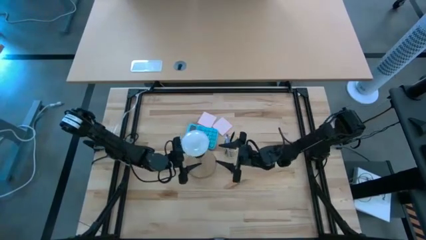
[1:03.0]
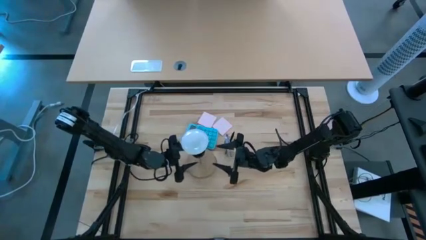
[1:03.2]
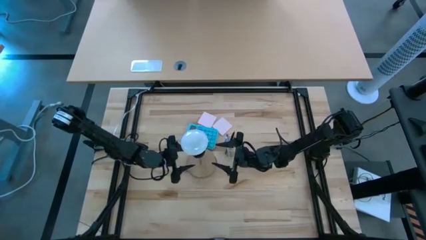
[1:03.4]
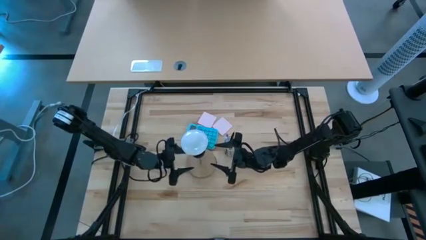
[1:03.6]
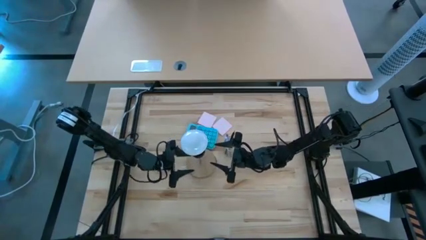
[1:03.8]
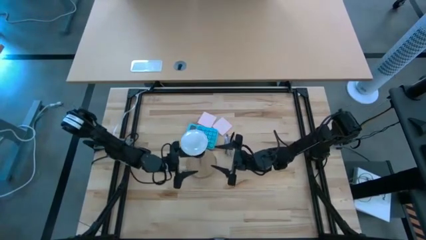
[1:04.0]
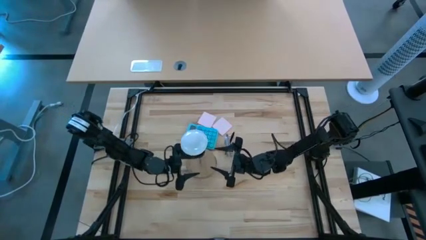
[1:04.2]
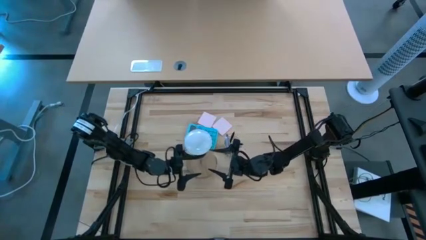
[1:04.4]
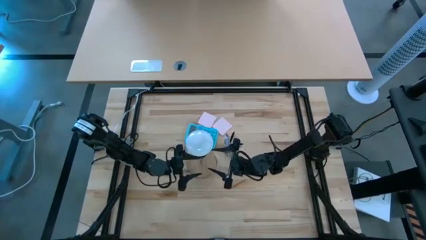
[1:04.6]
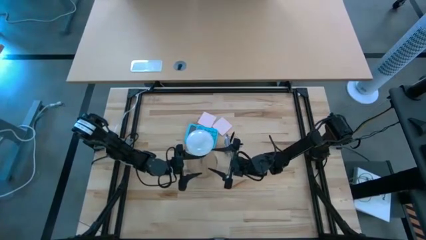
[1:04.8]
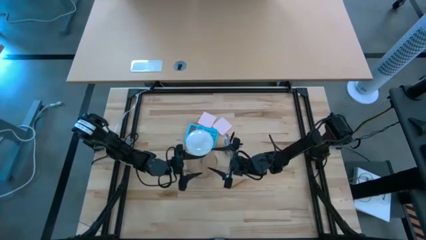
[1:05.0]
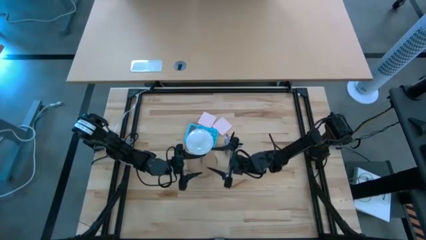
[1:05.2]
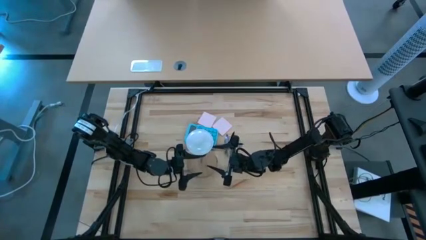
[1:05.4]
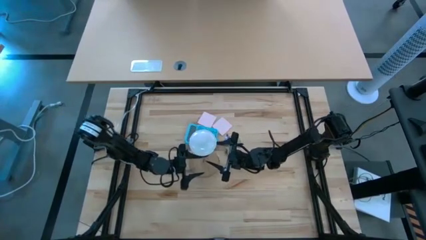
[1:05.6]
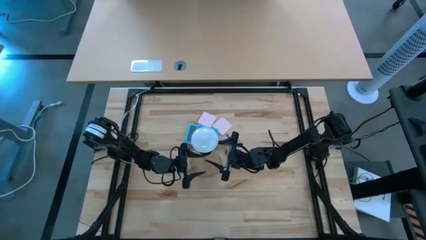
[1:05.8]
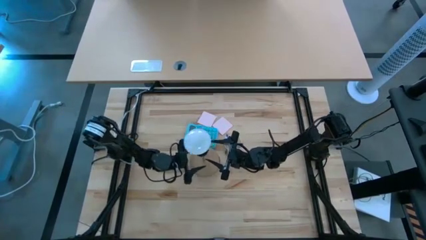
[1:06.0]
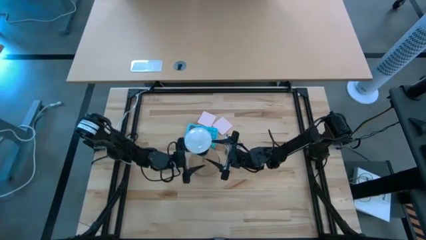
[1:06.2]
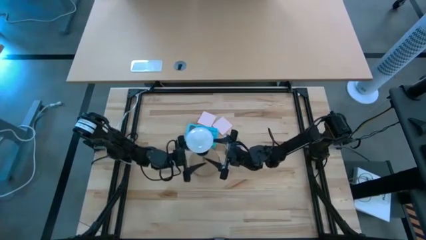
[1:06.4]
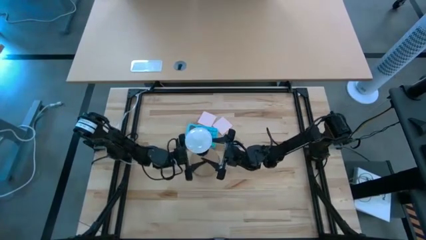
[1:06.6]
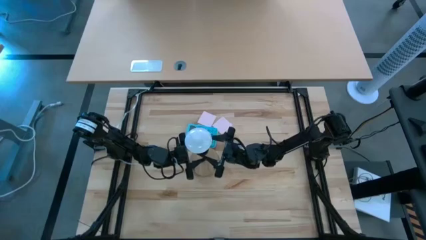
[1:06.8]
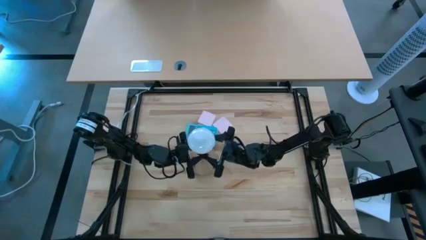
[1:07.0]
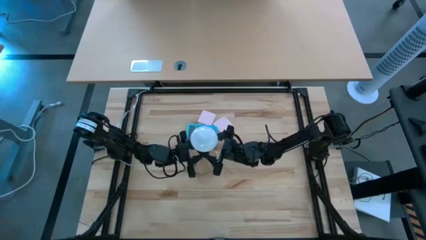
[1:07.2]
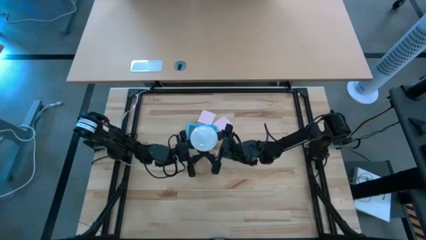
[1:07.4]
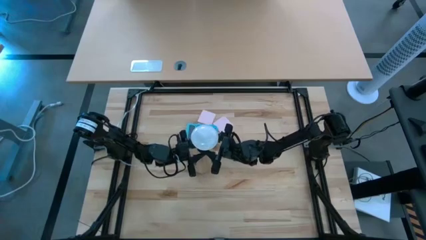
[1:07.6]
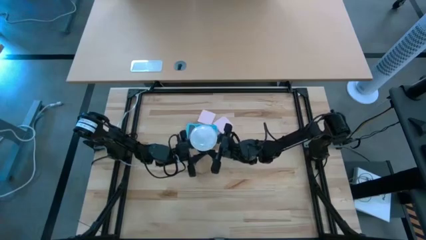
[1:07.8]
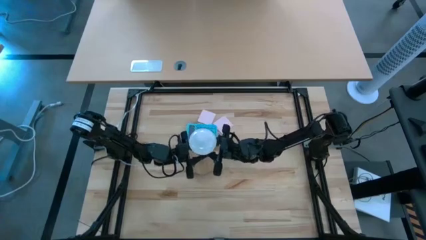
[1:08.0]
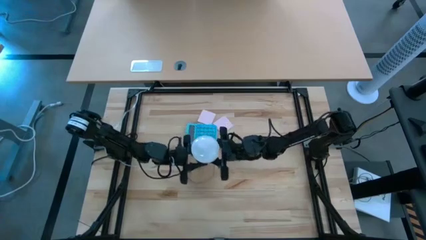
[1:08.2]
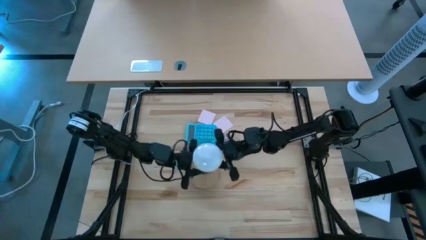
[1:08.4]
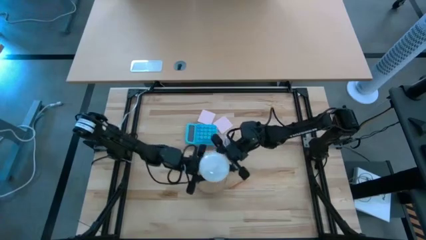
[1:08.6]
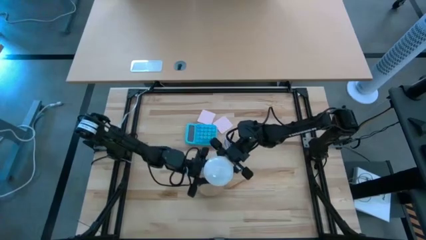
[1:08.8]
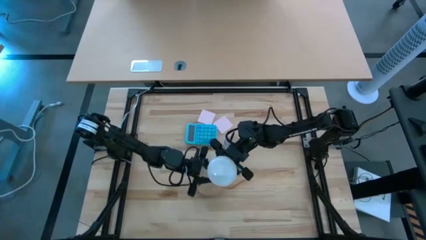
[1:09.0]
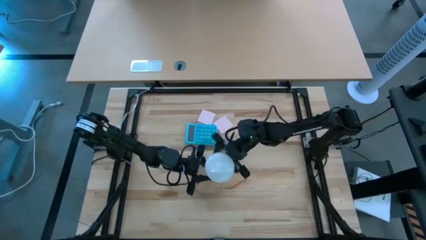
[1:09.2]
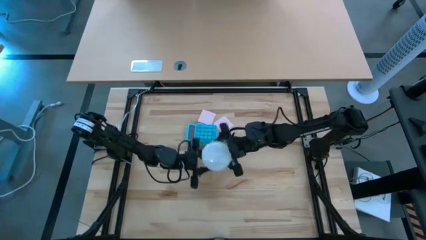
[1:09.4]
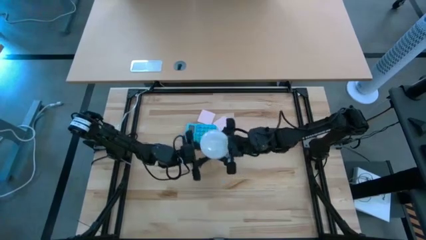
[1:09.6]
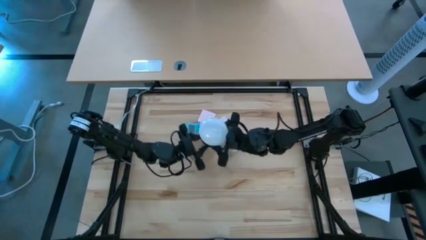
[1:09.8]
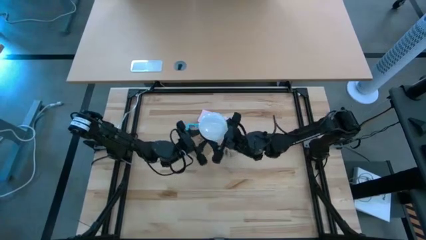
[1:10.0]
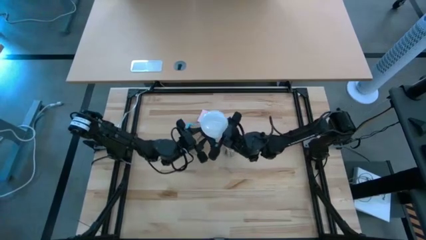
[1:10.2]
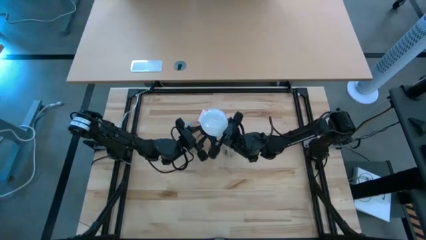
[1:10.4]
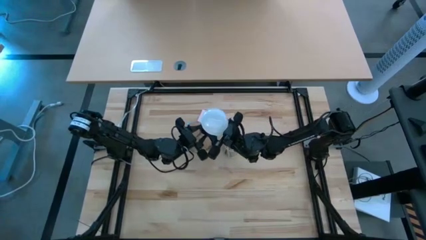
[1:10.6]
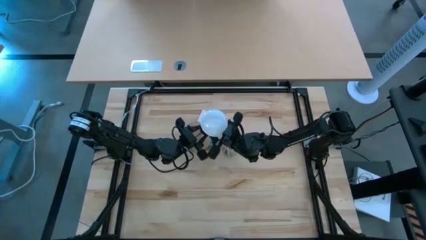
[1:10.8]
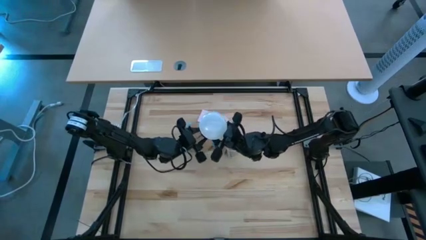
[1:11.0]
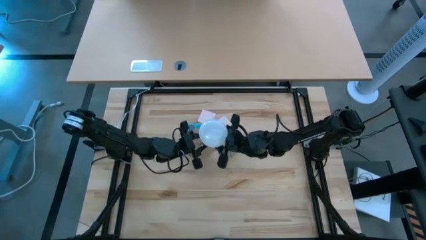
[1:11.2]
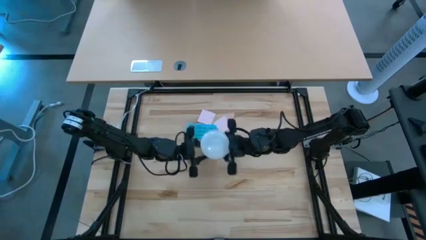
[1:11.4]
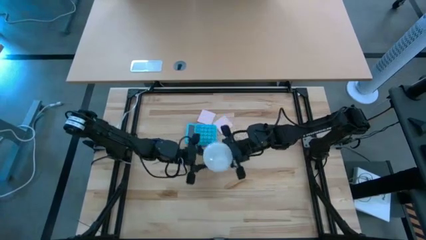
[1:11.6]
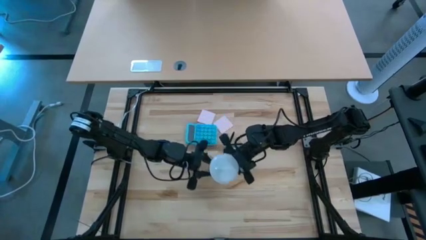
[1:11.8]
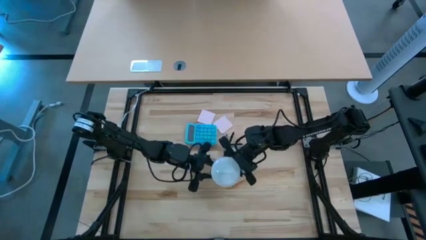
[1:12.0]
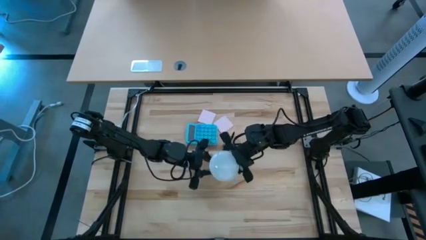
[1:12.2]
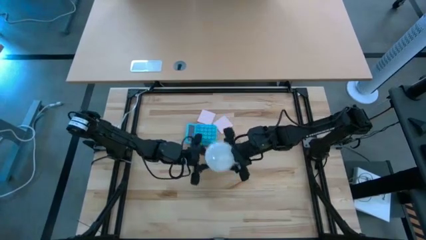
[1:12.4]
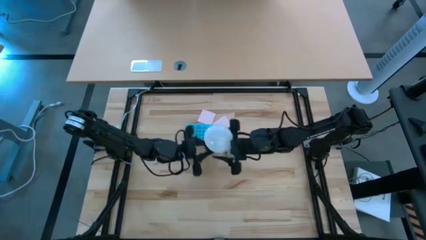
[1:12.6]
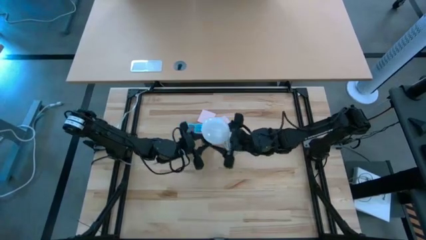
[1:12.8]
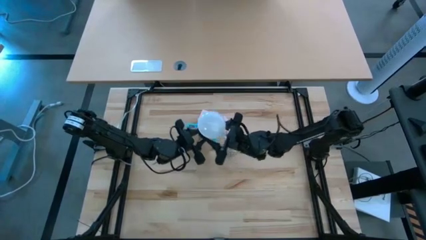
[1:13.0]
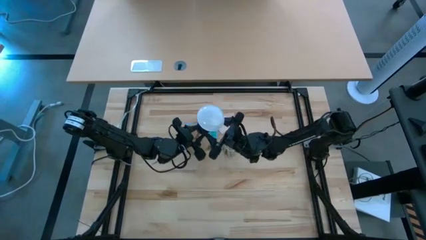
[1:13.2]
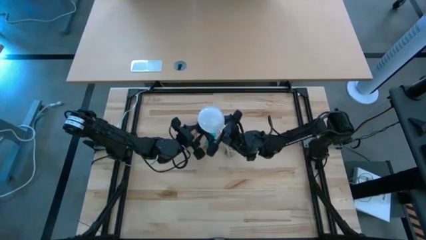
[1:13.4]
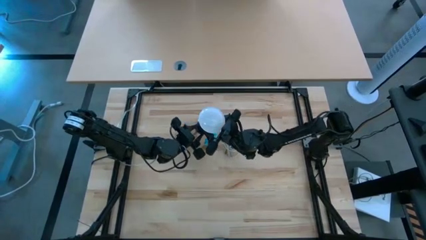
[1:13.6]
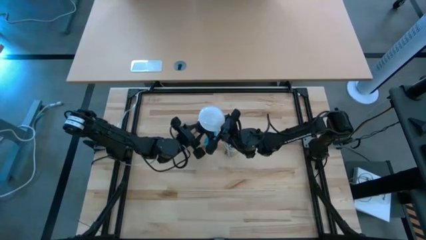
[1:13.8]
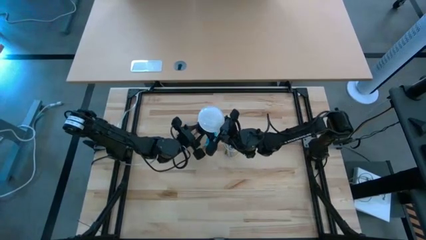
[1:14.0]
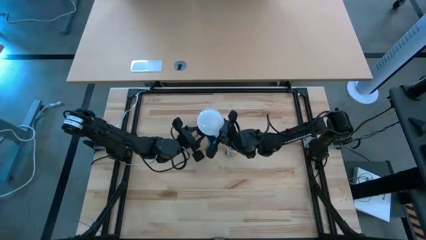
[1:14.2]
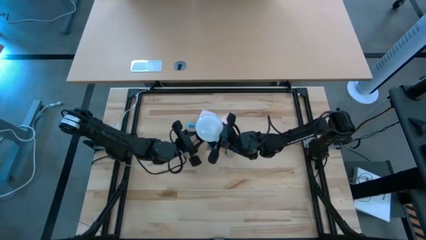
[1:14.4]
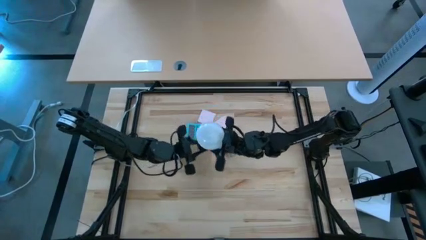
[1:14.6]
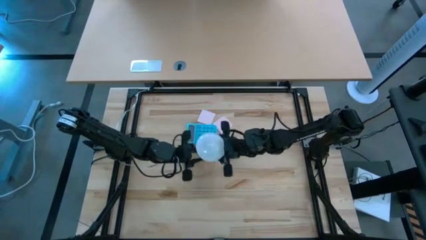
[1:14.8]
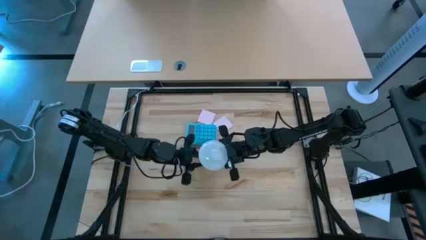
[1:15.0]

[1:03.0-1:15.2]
Task: Screw lightbulb
Remove the lightbulb from the black table lamp

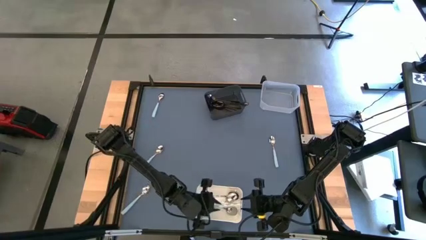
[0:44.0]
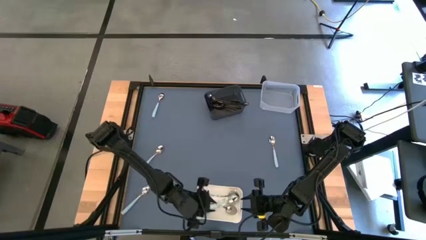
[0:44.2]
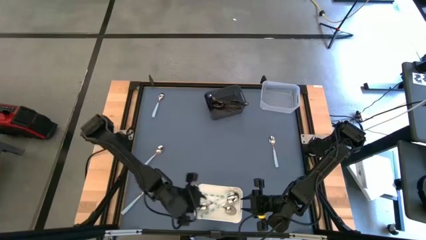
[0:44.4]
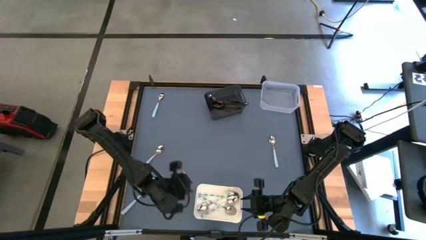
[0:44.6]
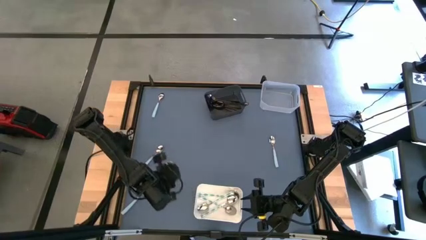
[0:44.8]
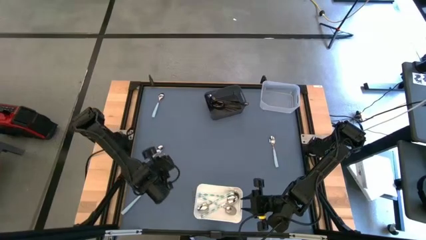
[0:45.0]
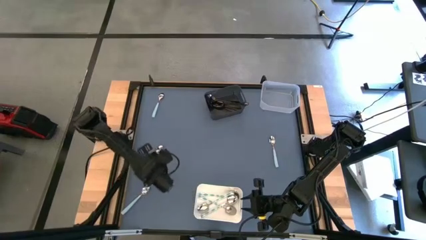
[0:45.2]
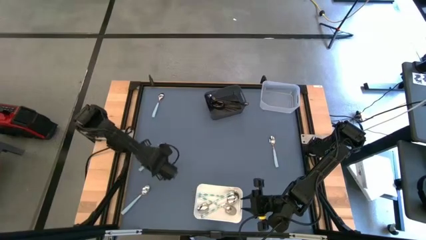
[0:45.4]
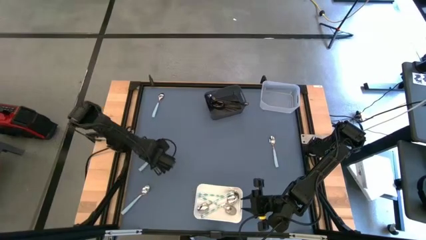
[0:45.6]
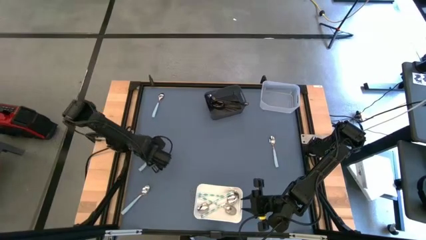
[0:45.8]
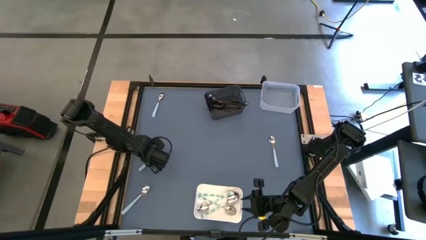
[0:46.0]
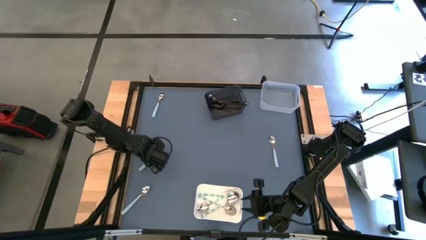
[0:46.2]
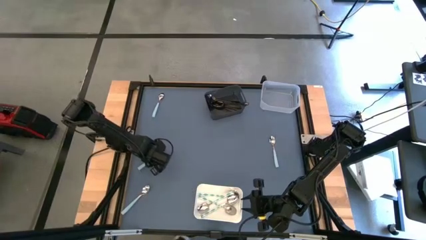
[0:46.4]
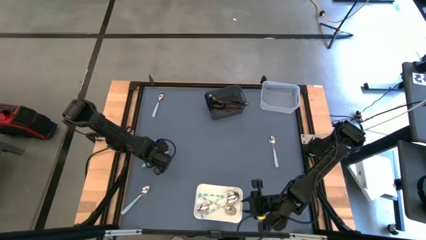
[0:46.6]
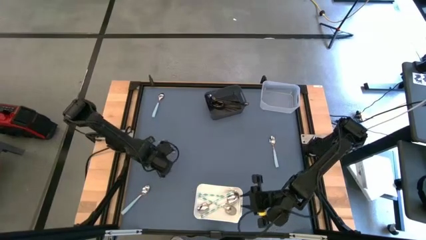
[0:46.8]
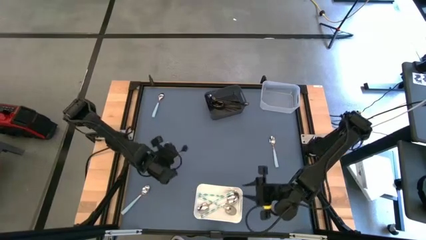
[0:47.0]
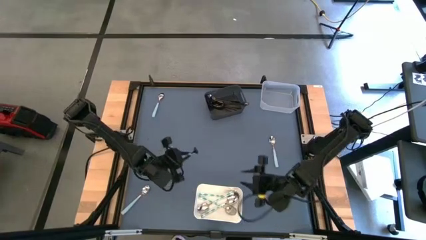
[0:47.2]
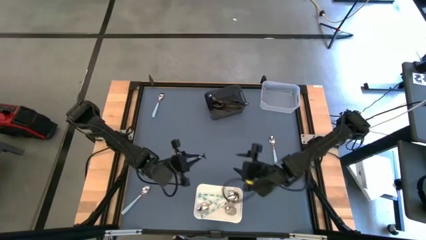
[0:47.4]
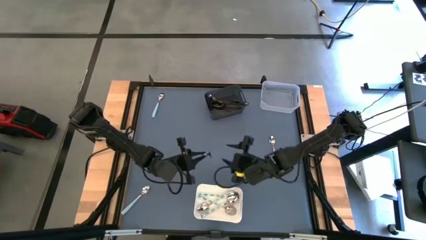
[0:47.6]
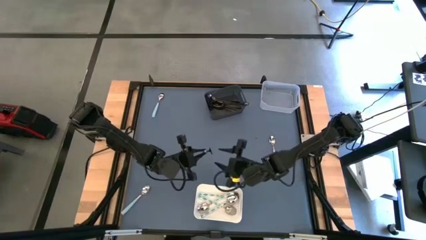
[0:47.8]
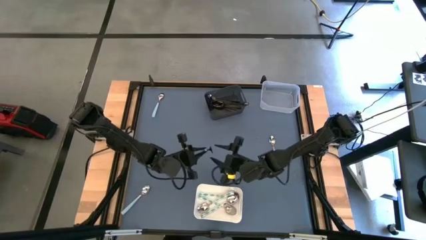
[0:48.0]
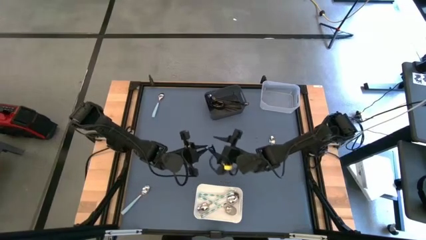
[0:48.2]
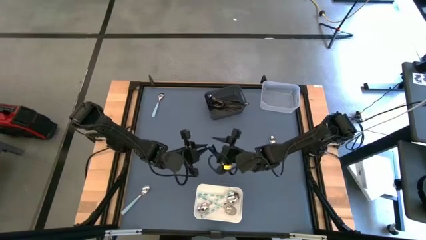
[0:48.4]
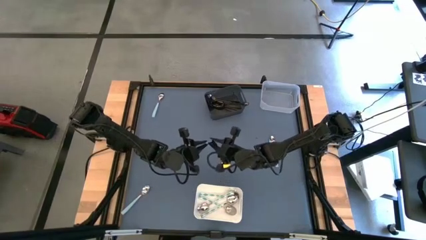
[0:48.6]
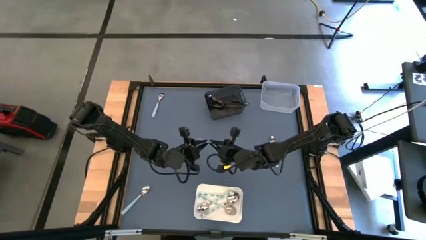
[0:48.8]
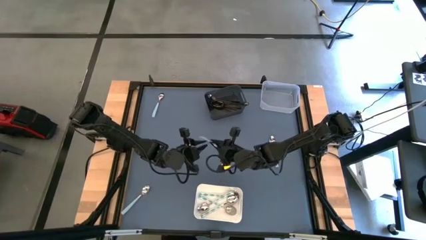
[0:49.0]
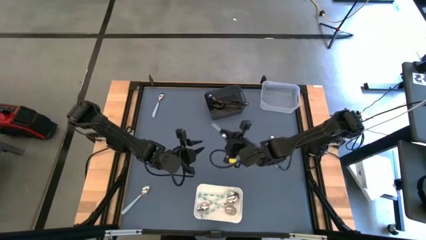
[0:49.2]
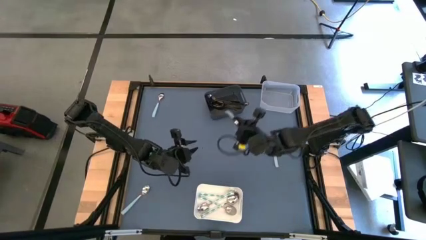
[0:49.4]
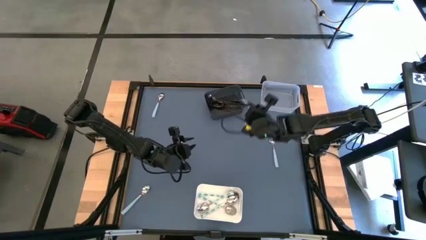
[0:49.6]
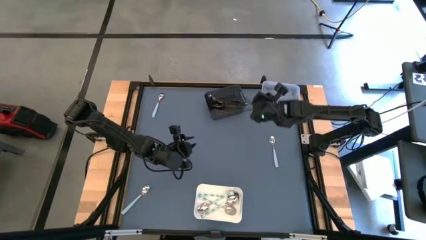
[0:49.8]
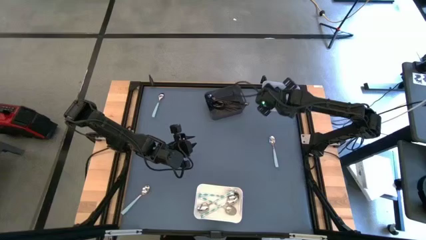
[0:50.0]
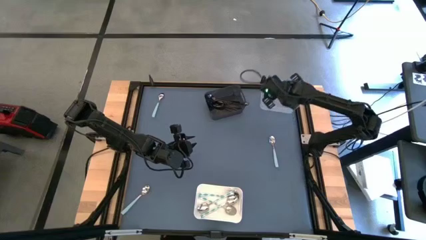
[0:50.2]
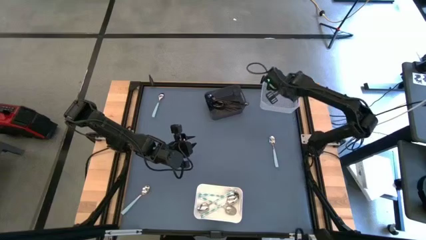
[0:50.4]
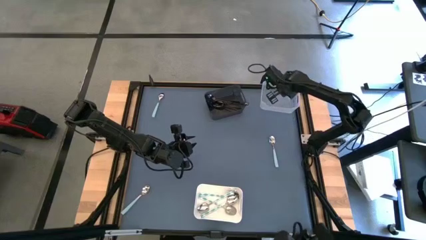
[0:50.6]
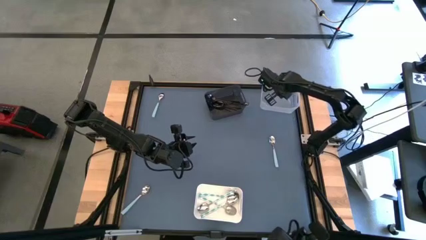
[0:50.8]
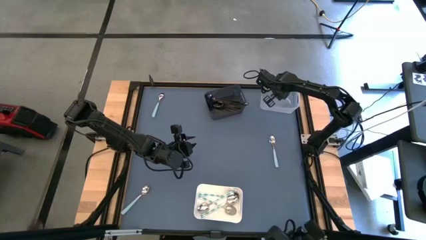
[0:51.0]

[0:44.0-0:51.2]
Task: Sort silverware by color (type)
Put the blue spoon into the transparent bin
